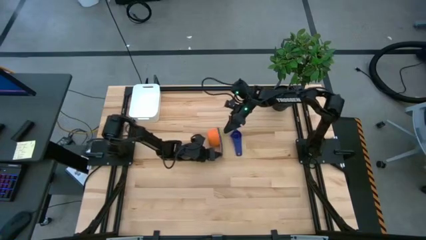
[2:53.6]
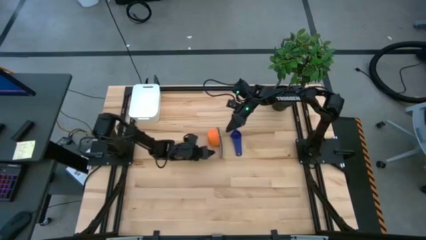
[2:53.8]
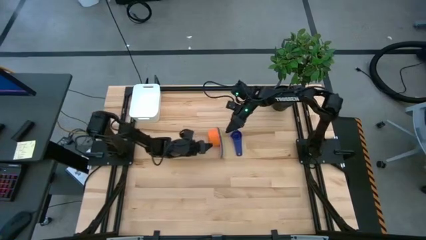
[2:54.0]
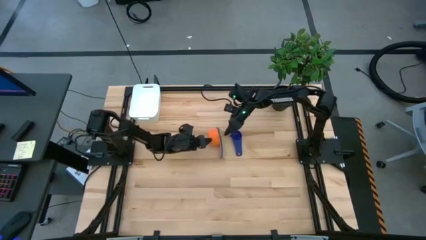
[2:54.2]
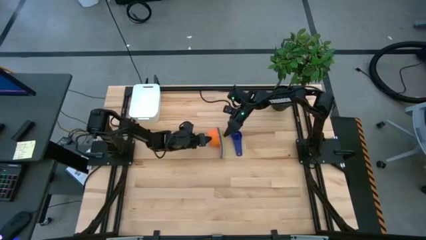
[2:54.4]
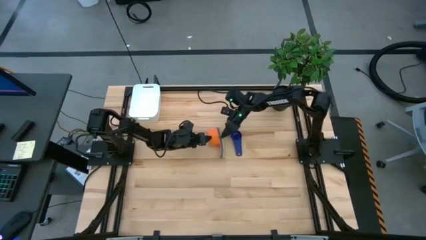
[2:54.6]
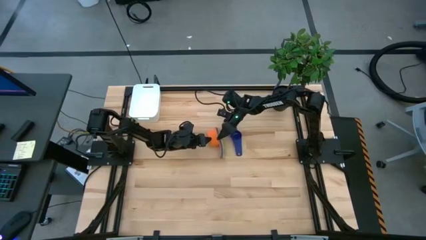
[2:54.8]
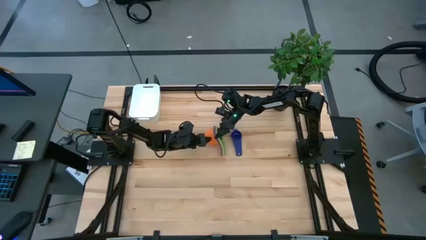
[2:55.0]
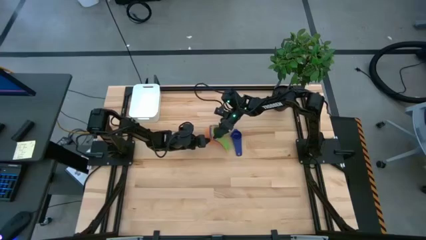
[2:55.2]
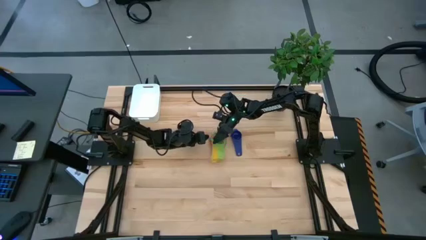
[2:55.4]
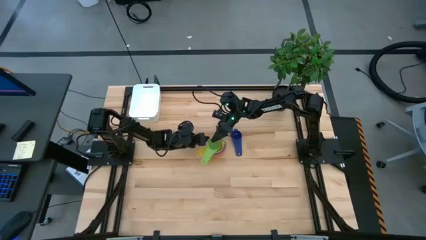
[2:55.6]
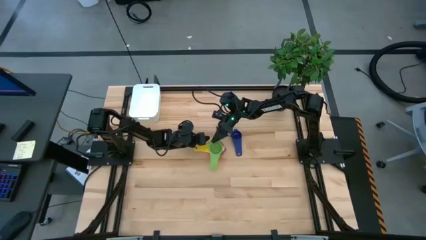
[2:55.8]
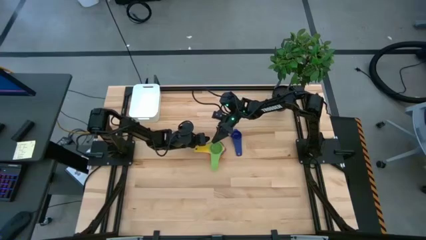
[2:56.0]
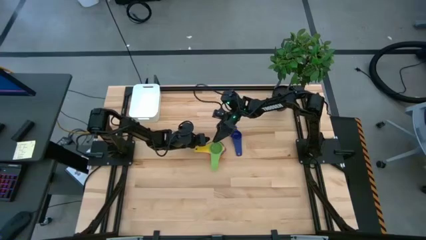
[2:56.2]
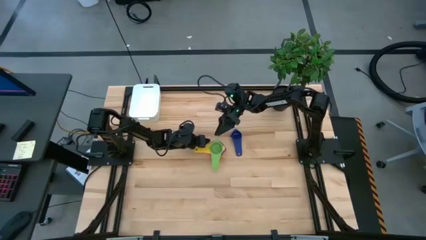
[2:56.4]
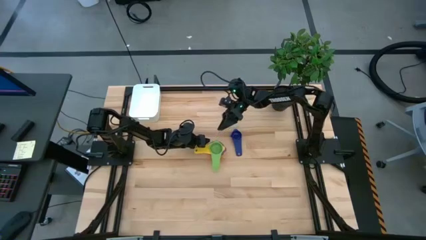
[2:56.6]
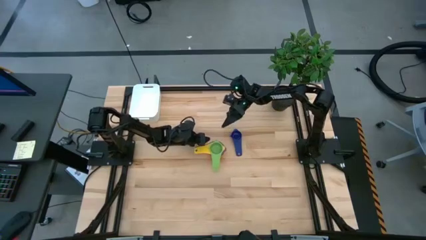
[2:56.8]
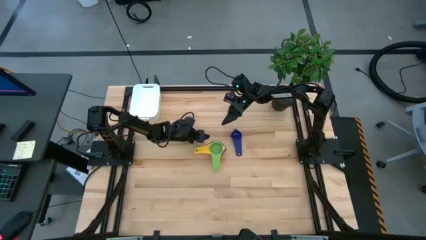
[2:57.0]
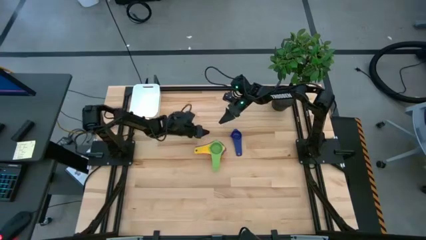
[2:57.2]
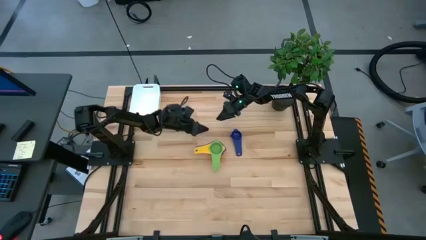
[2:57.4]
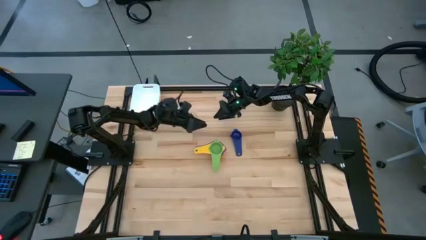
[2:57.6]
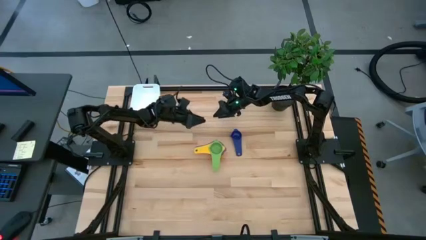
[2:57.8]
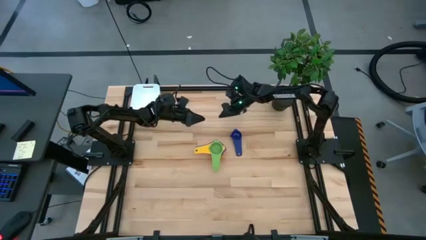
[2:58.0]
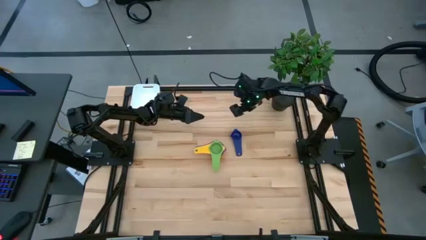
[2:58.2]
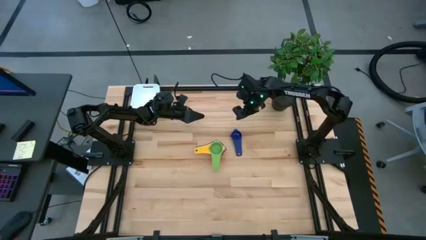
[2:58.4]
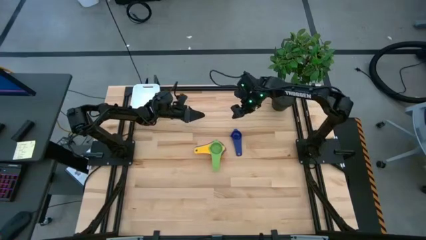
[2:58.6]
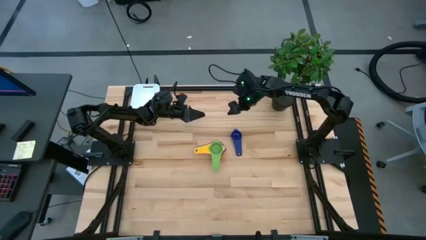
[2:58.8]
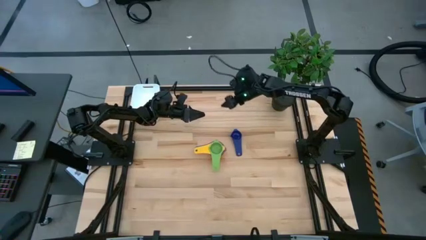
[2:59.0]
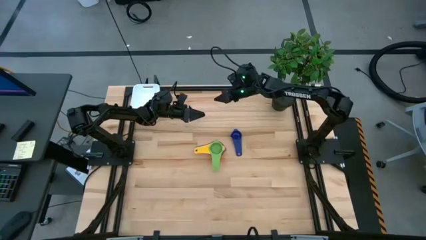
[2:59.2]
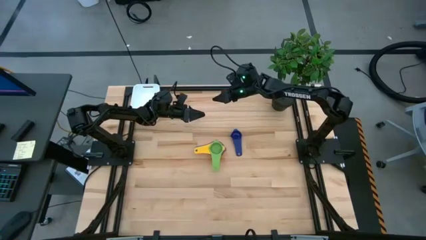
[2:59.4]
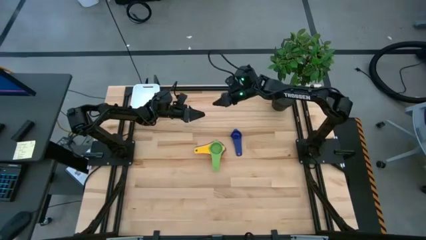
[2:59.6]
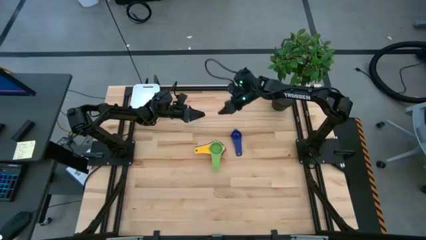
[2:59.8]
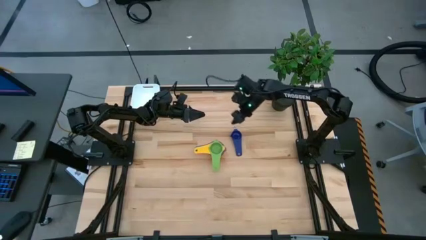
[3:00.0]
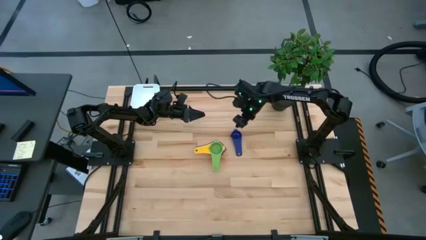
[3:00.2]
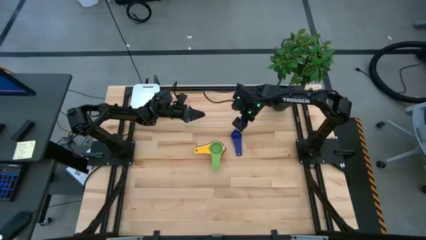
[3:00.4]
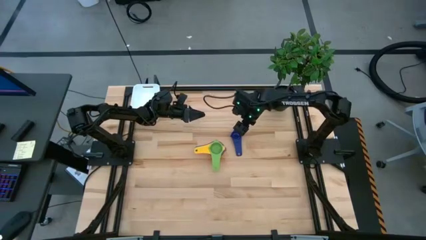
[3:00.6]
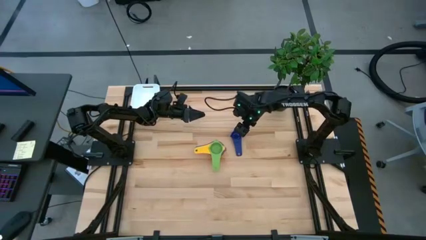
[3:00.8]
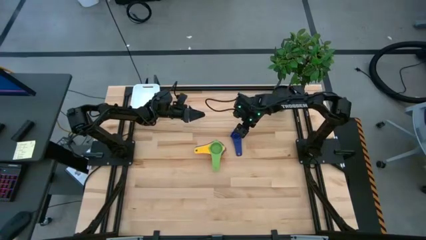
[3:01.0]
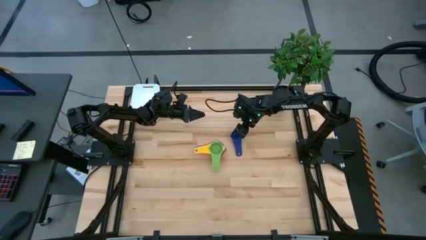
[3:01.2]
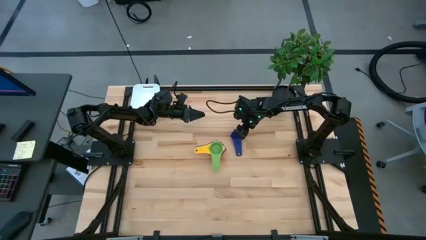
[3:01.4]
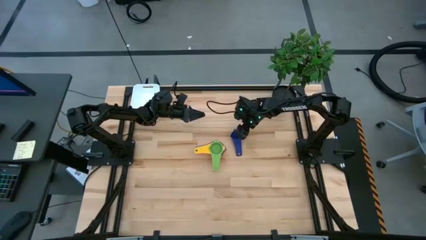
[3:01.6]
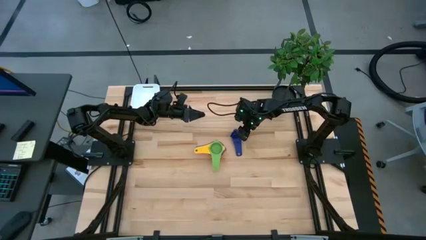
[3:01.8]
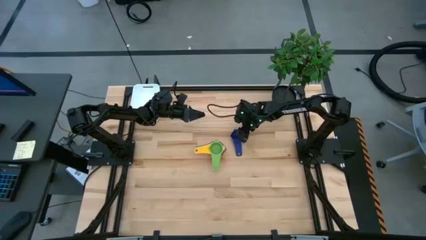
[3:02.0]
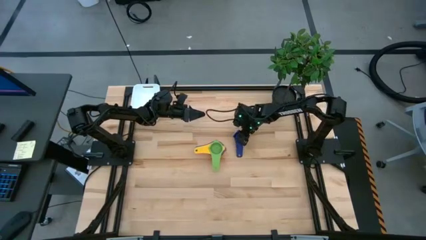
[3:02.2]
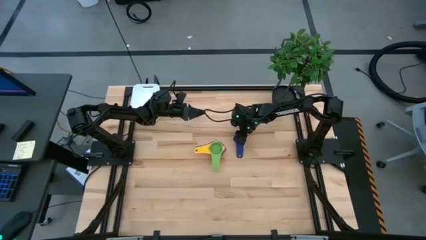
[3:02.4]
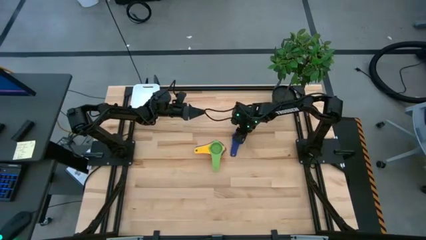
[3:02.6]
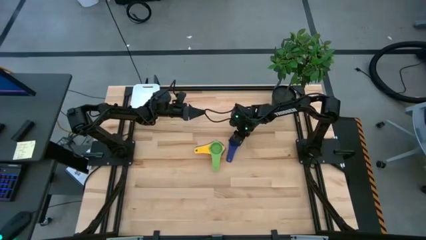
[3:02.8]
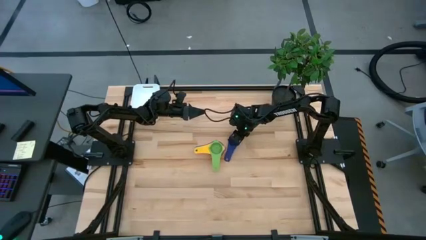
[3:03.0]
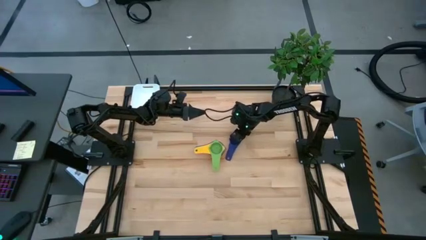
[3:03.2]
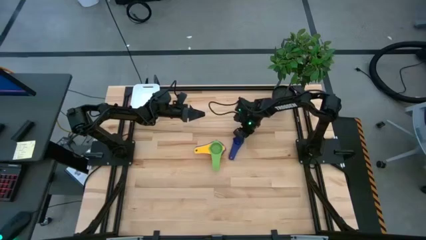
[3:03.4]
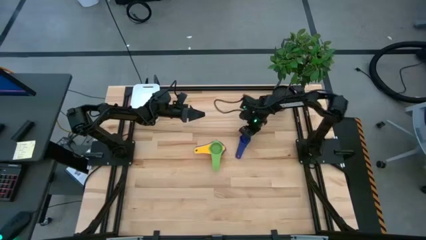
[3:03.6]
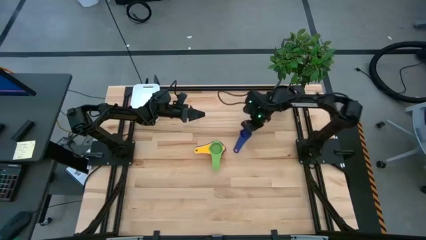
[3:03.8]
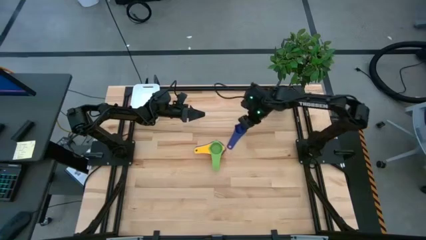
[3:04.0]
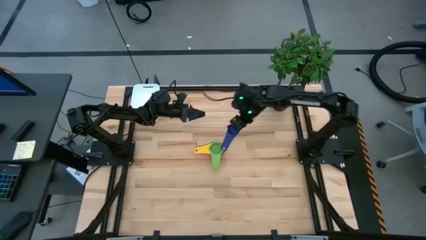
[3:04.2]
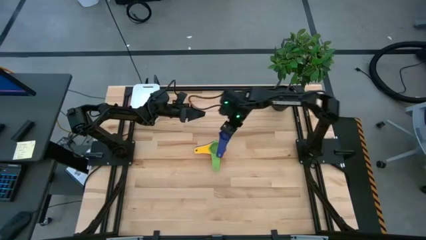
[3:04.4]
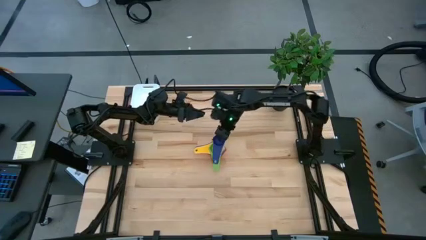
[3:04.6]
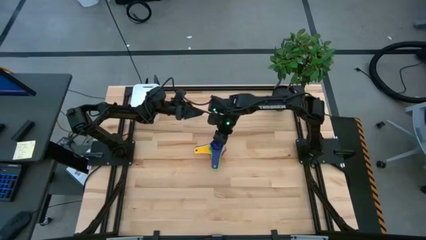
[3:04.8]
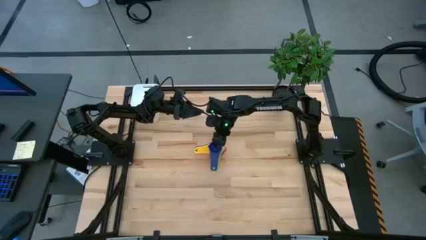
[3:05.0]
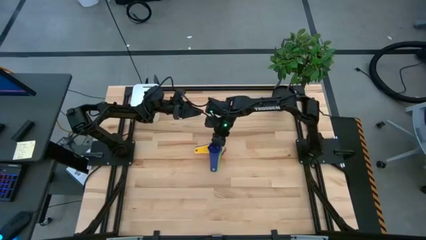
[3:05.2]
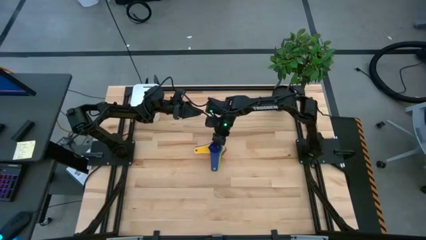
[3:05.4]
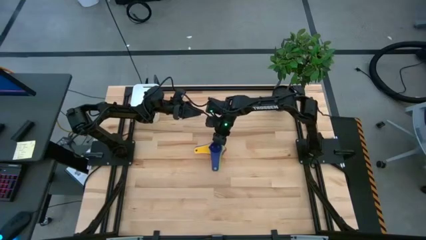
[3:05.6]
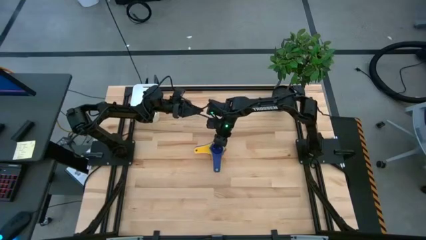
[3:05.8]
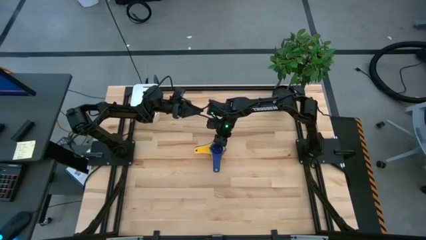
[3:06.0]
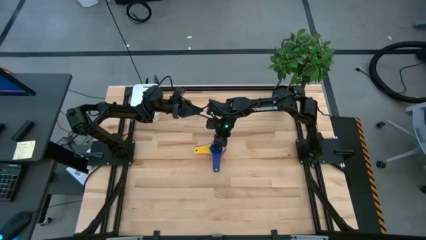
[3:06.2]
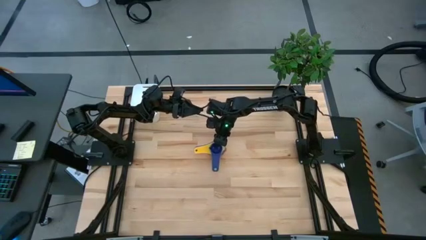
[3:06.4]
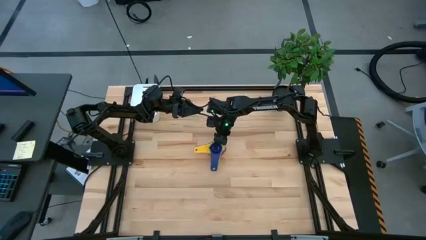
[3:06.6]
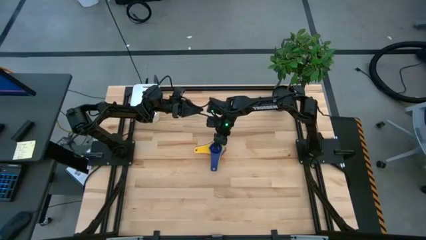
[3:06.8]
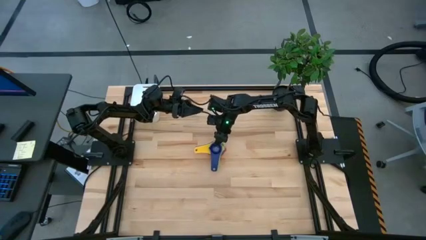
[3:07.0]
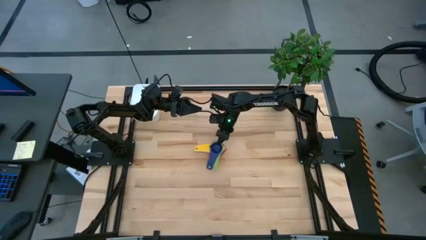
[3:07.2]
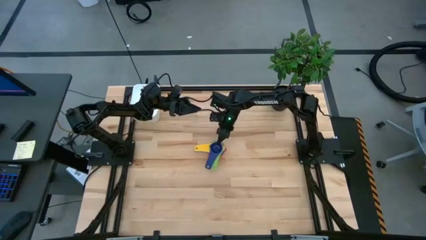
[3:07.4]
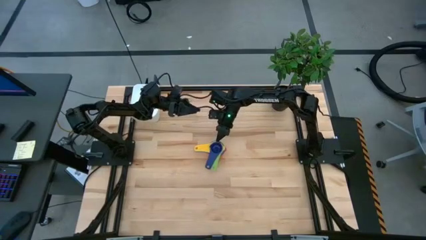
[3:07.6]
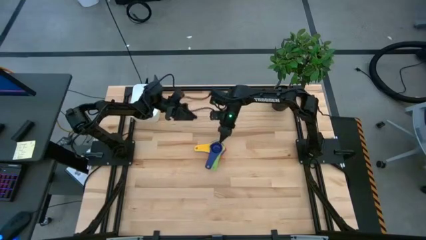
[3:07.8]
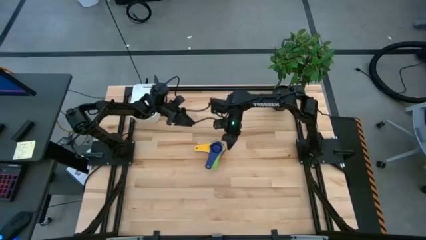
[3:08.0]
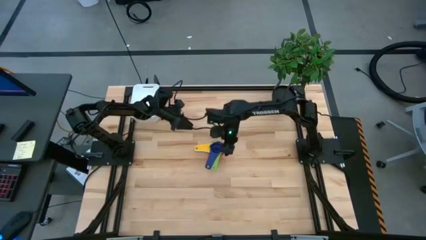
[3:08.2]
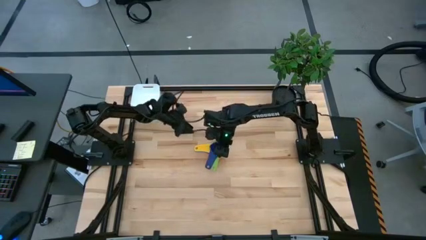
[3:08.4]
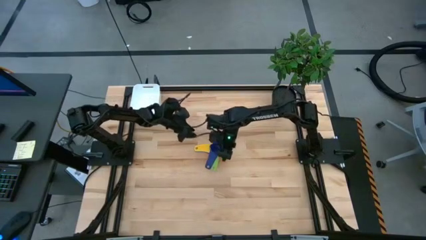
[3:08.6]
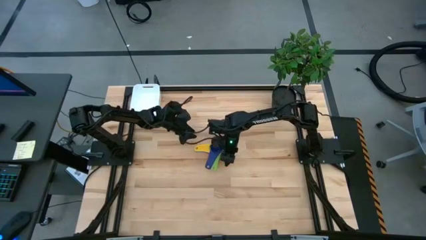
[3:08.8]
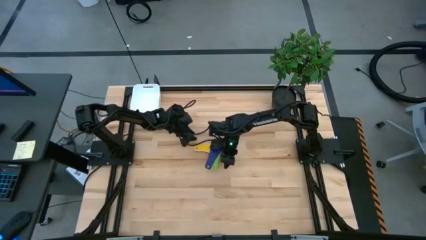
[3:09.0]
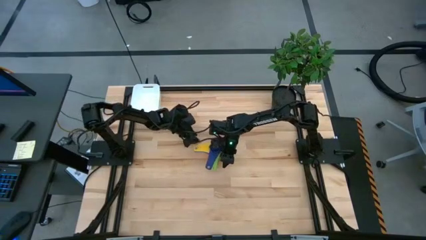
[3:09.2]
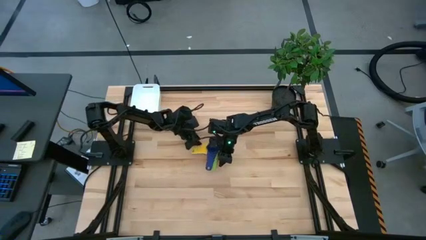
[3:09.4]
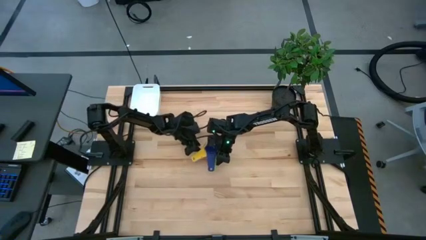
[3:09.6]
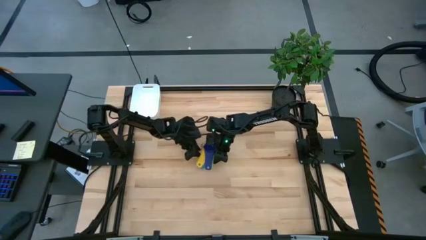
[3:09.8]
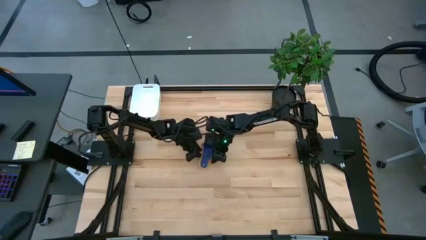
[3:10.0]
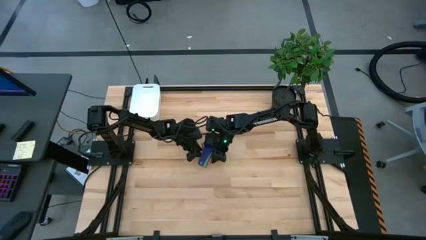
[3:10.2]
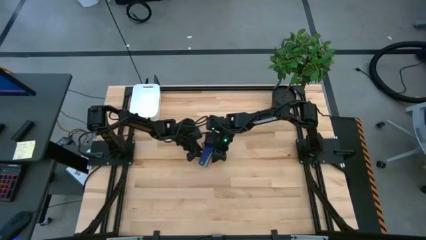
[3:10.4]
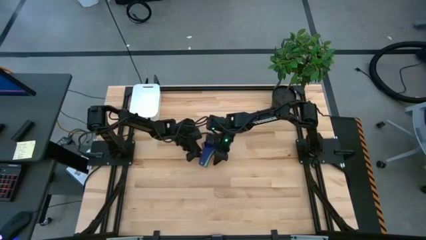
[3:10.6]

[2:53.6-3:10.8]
Task: Nest measuring cups in basket
Stack the blue measuring cup on top of the green measuring cup
